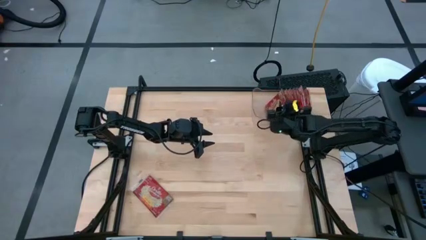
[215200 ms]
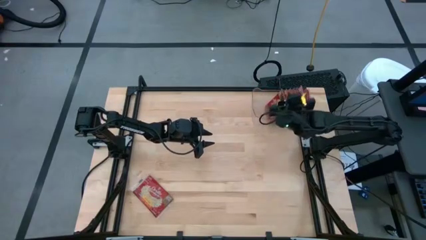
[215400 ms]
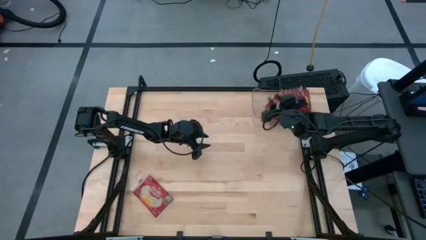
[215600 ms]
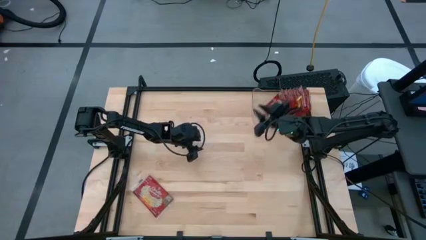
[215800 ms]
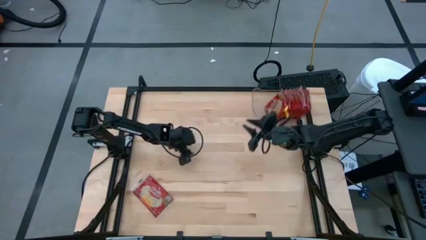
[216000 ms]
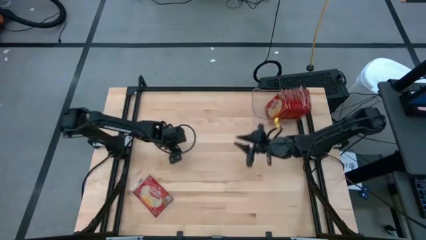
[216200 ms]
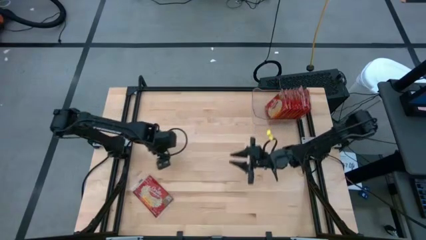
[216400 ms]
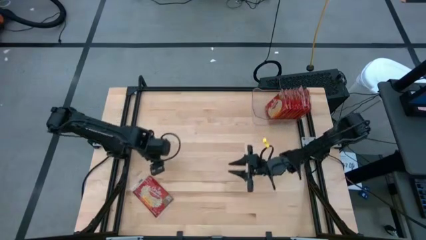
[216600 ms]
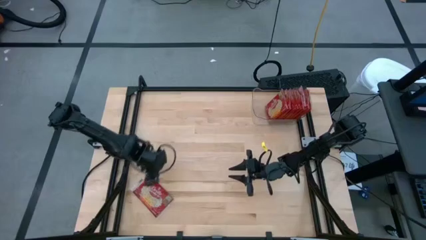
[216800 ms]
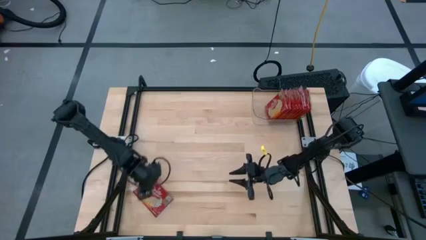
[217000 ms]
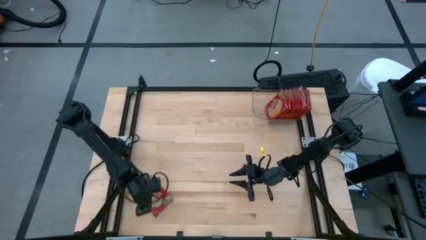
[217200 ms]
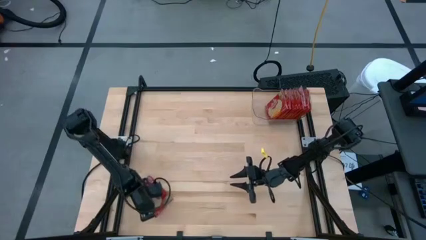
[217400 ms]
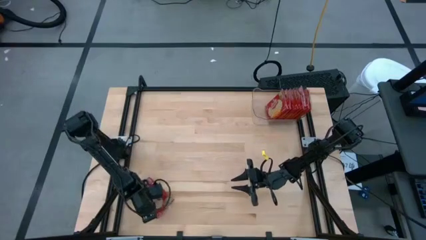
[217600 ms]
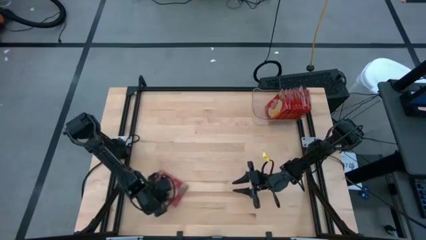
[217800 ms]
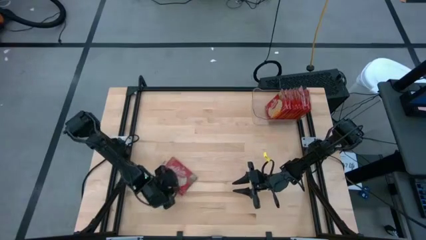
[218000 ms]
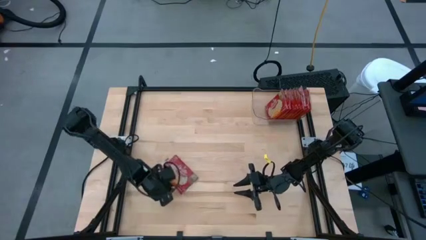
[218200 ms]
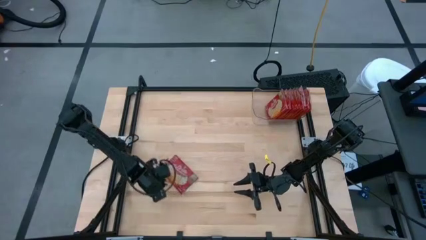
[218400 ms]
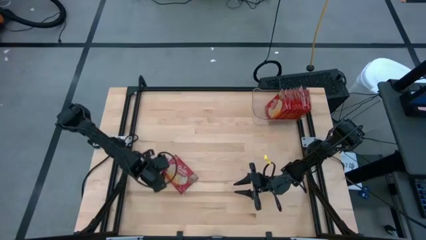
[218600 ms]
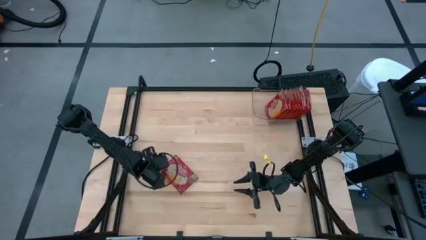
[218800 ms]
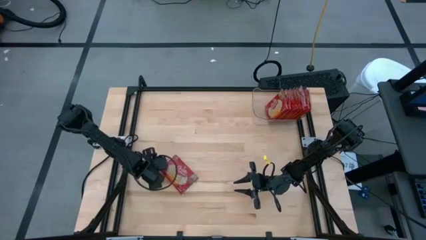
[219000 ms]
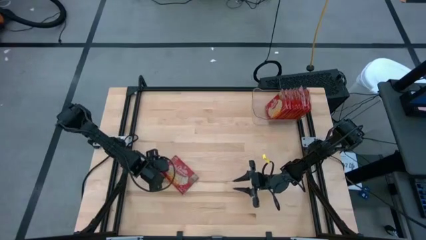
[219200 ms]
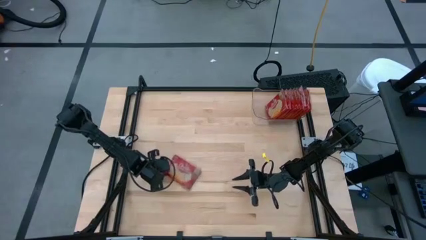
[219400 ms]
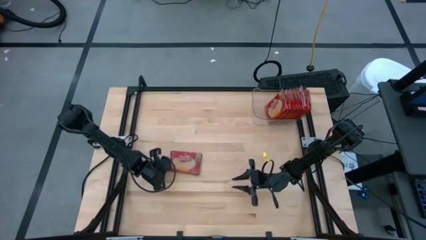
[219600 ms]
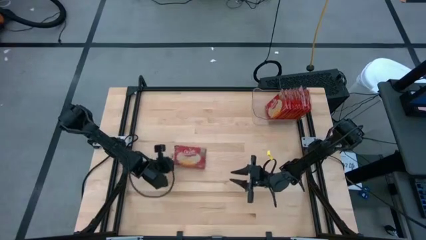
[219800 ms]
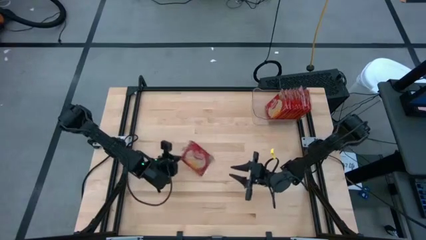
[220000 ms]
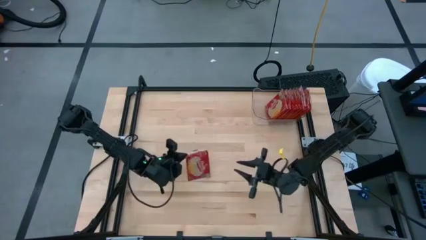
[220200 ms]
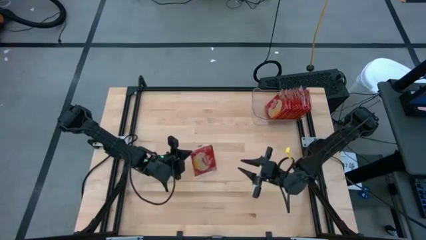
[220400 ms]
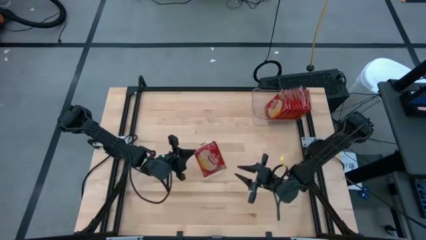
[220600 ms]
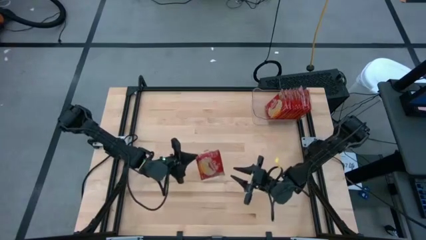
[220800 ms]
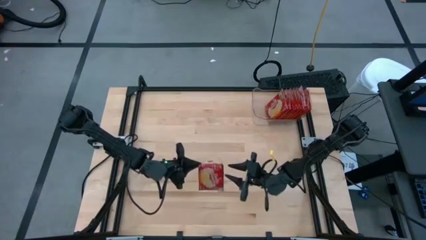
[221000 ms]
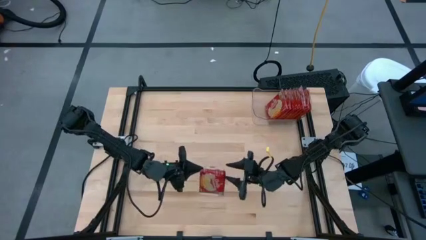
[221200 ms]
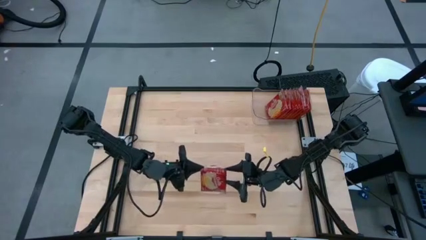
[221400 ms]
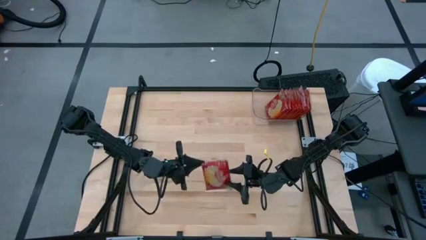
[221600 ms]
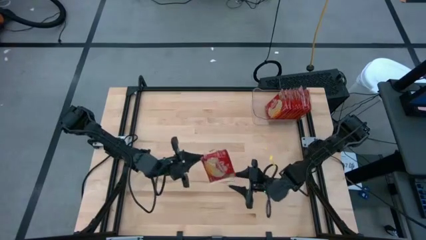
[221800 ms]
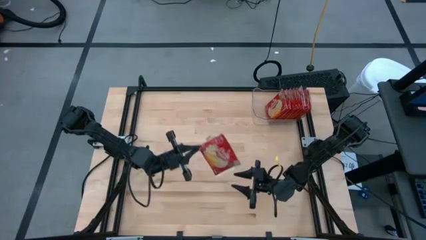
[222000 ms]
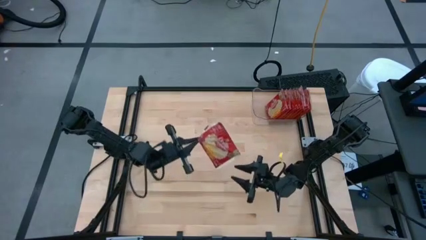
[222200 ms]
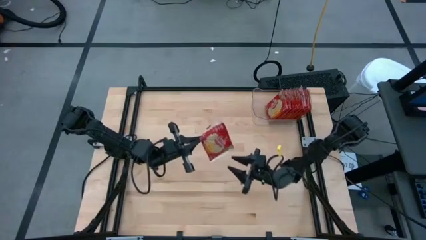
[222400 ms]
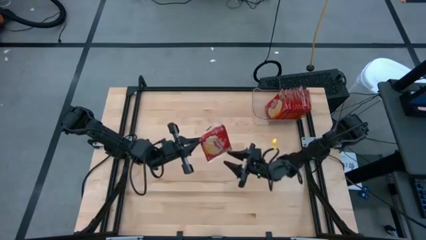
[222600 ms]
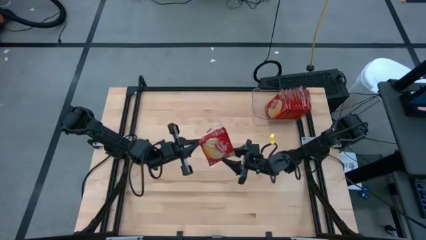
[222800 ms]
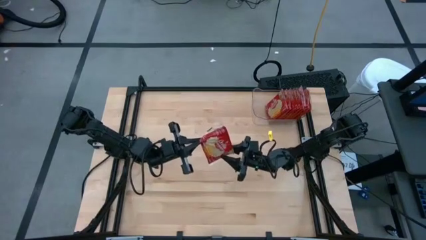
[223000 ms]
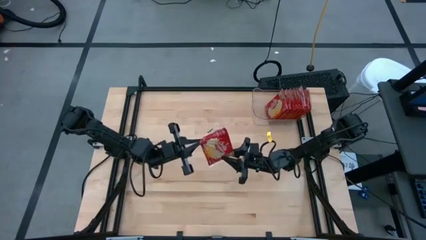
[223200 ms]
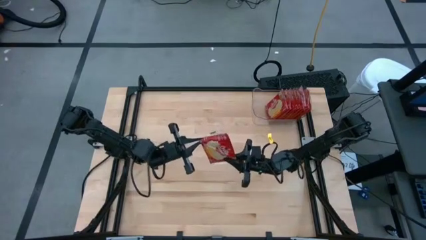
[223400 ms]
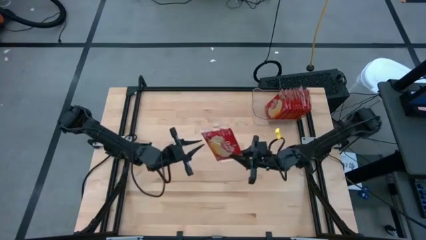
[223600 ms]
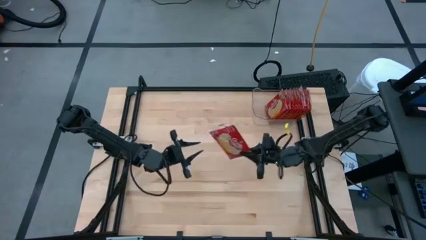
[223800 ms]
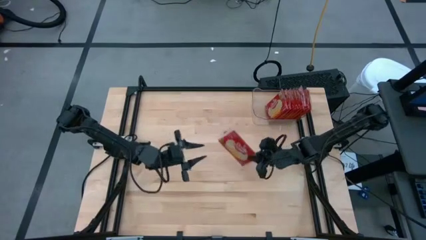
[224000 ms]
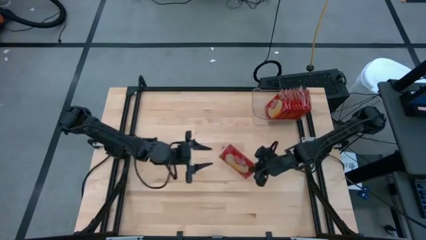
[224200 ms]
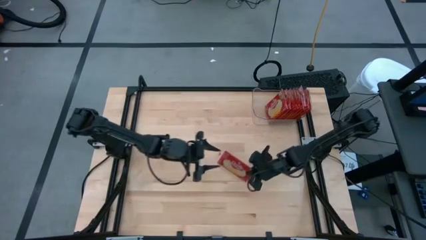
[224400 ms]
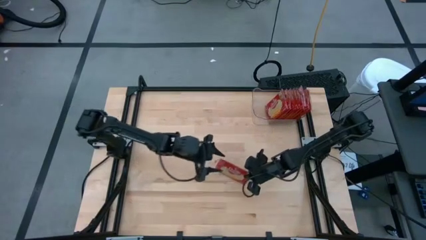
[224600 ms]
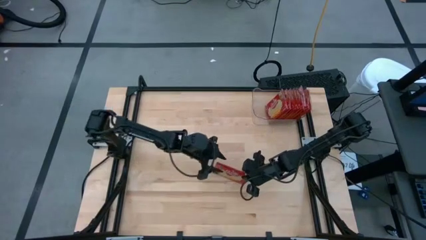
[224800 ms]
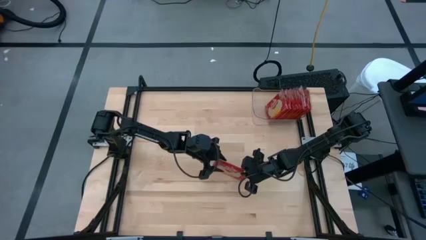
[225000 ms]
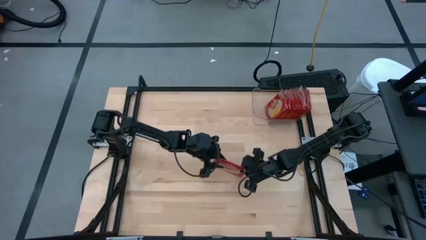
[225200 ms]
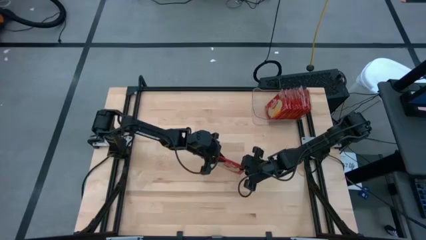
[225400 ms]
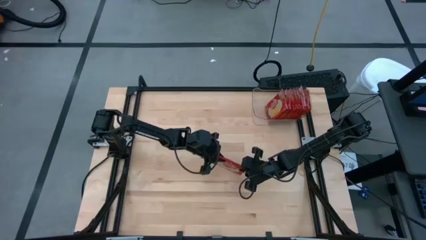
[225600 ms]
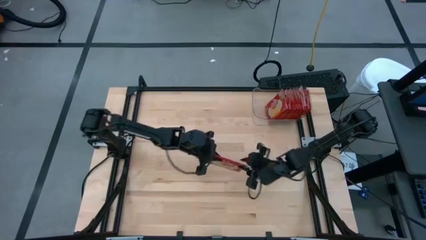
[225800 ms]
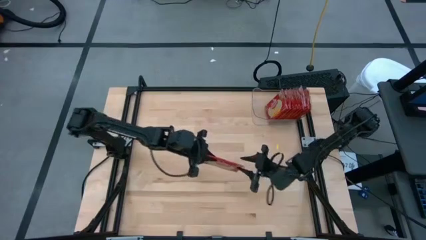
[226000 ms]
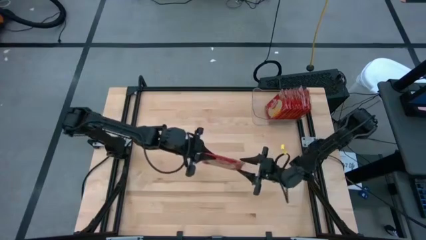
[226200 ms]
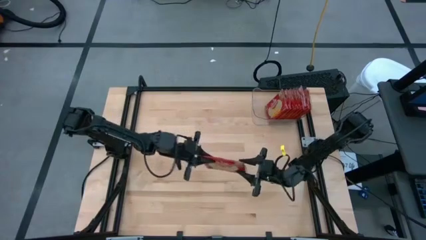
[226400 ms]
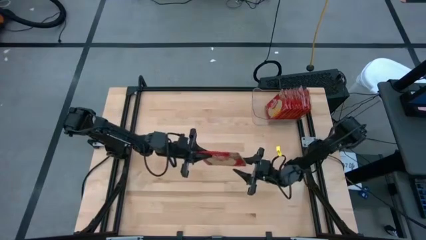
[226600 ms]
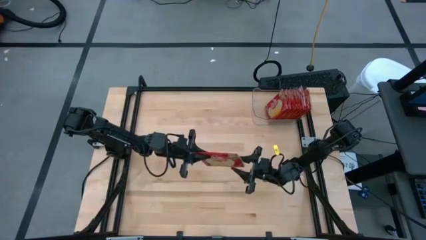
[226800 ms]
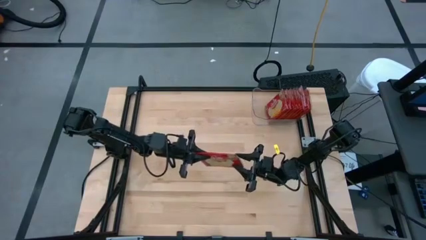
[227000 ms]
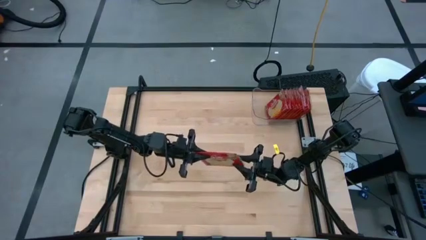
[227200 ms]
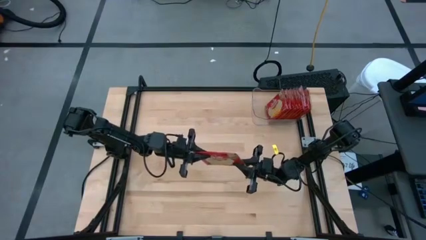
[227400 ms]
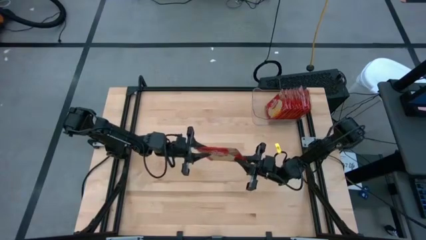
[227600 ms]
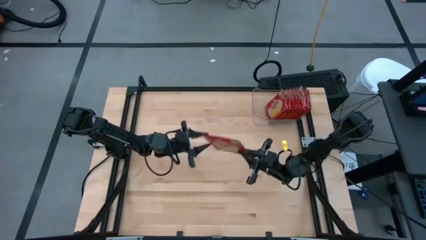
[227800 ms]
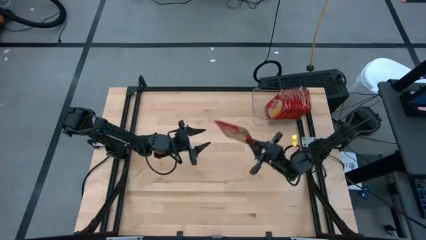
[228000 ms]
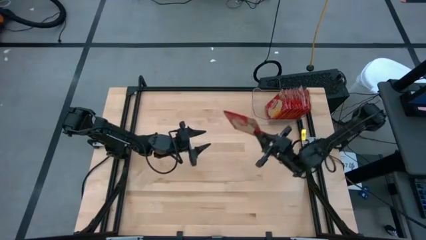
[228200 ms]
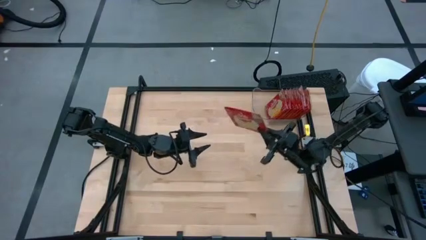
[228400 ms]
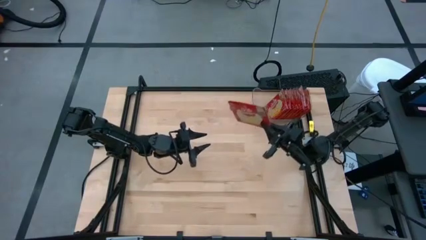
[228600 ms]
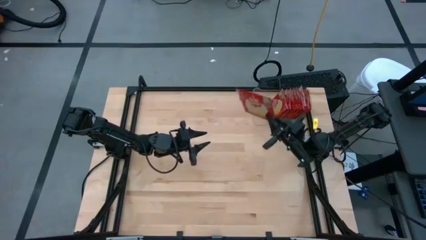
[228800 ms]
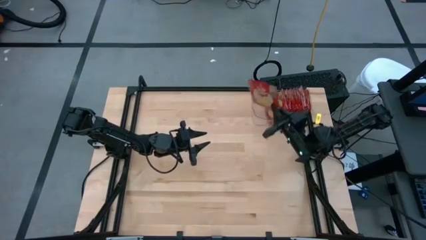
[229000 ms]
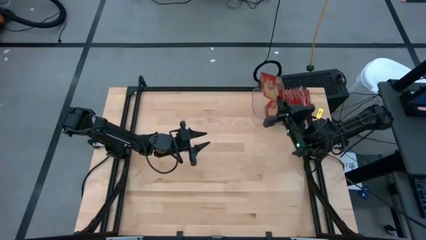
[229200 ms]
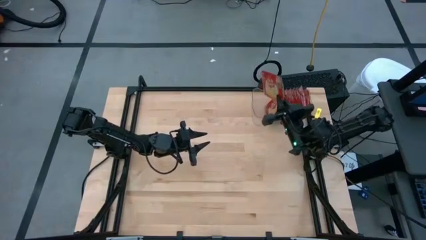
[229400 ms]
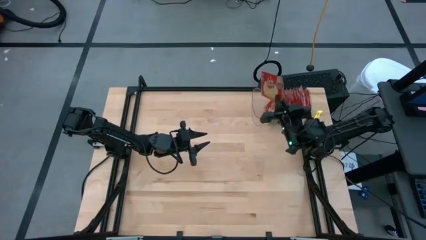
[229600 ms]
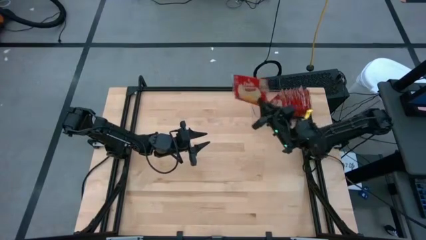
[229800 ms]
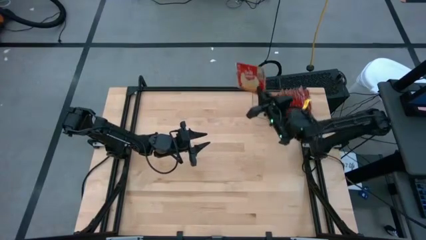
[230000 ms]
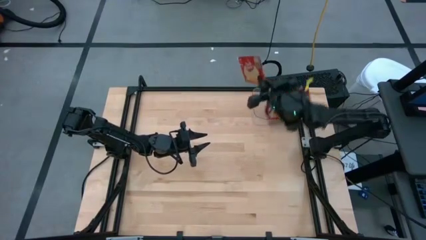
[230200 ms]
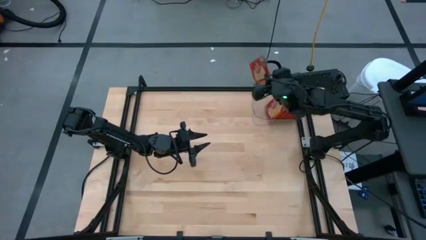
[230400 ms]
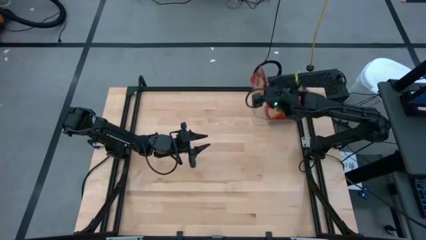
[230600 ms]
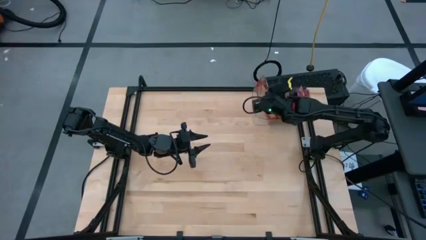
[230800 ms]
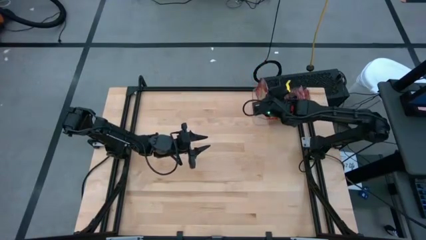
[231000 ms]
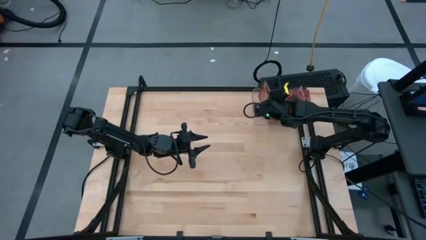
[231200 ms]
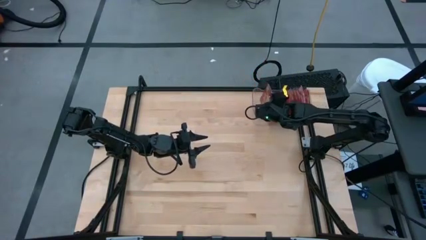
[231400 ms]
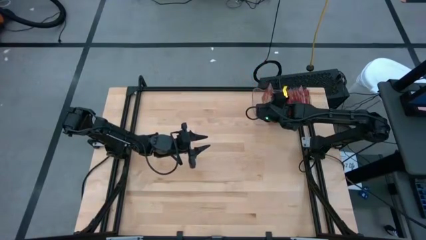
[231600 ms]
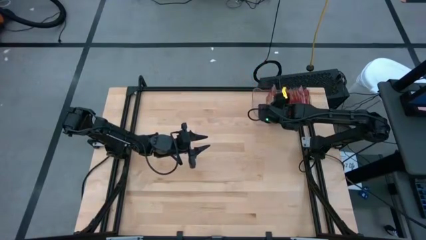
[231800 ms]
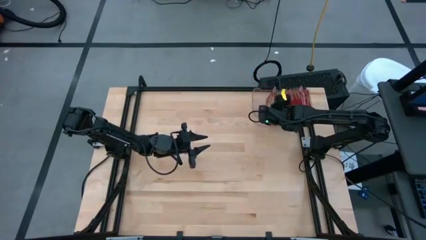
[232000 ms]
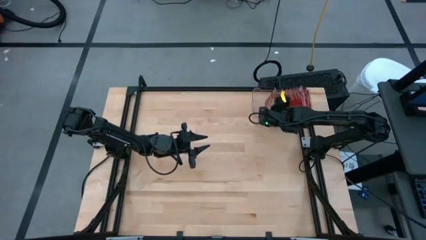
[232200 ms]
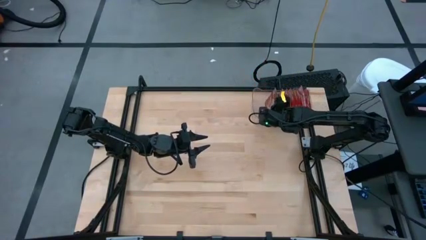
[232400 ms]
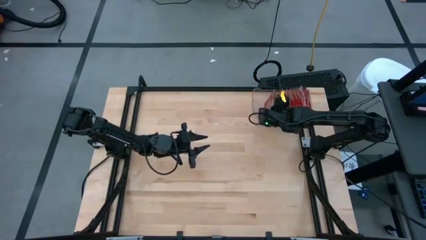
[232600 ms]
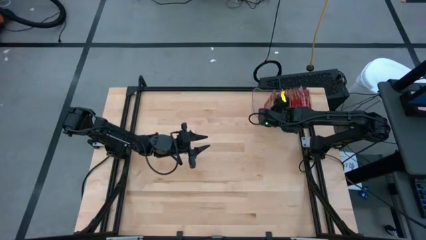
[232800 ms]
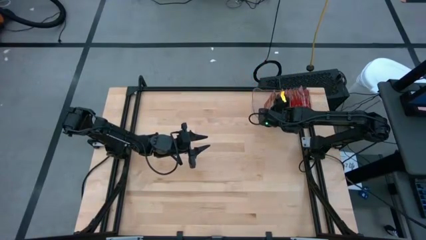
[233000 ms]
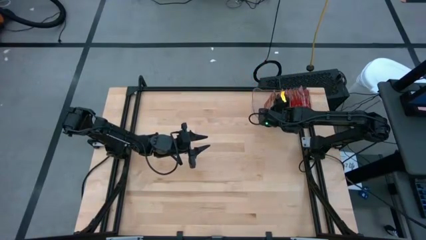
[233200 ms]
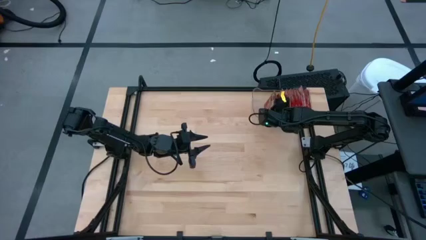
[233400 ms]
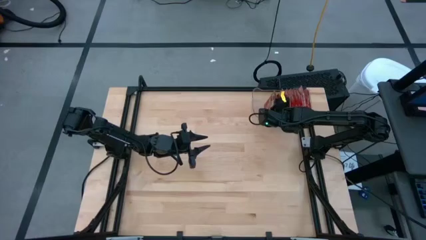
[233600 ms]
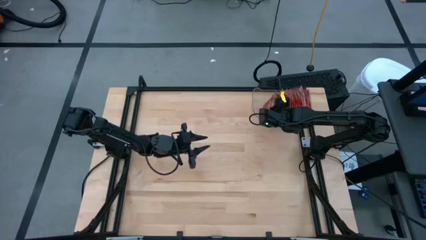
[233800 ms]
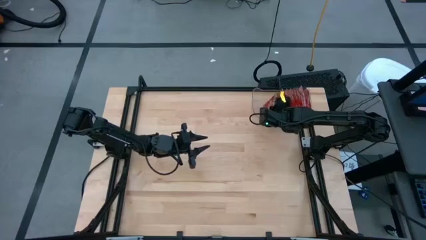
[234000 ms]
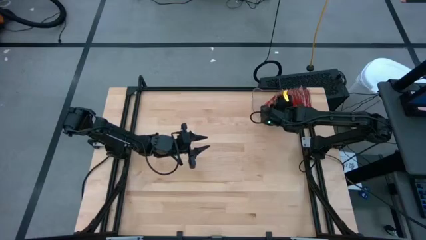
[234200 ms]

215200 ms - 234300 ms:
Task: Sort popcorn bags into baskets
Put the red popcorn bag into the transparent bin
